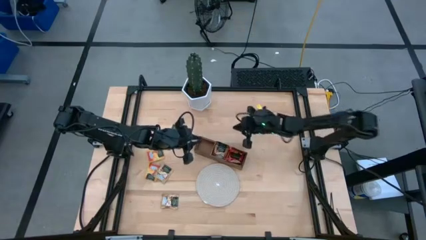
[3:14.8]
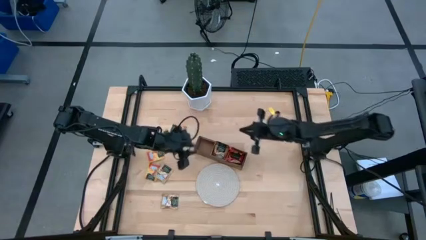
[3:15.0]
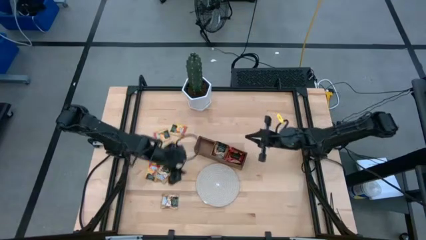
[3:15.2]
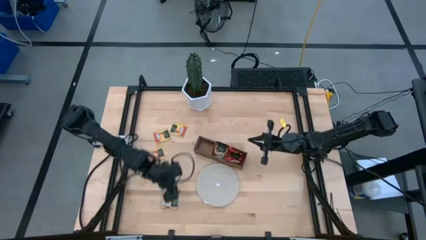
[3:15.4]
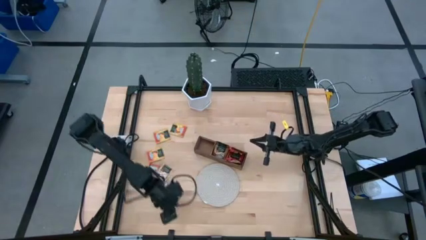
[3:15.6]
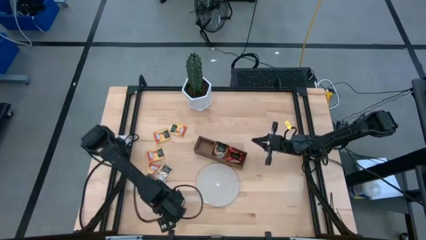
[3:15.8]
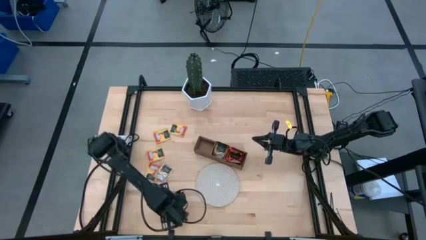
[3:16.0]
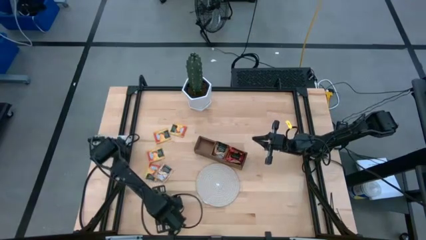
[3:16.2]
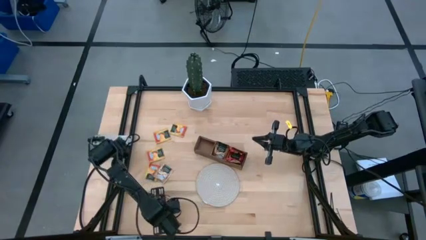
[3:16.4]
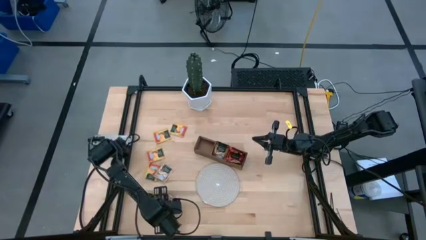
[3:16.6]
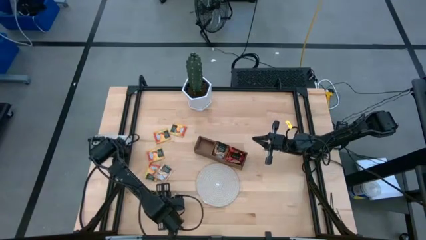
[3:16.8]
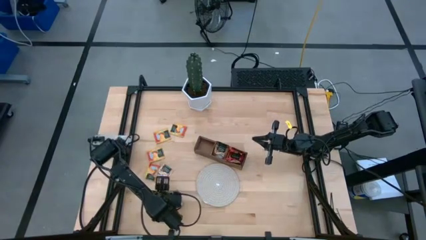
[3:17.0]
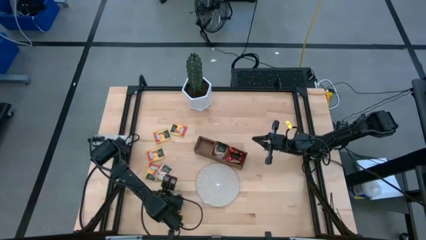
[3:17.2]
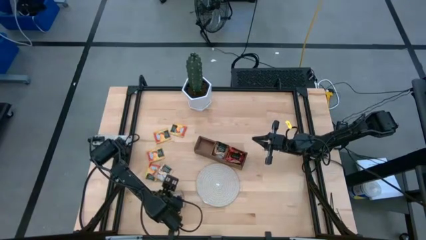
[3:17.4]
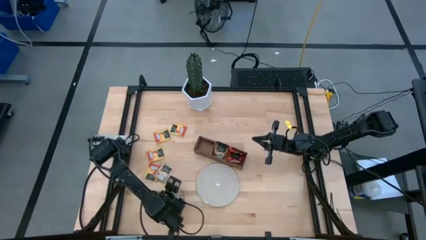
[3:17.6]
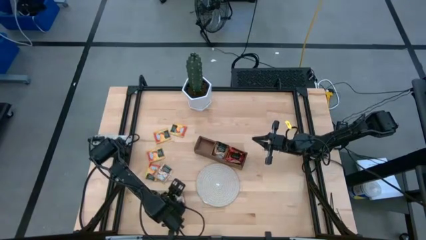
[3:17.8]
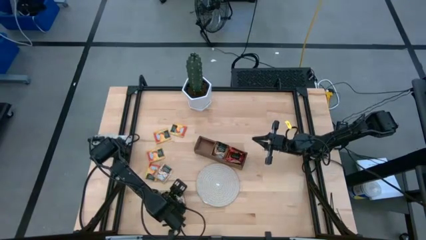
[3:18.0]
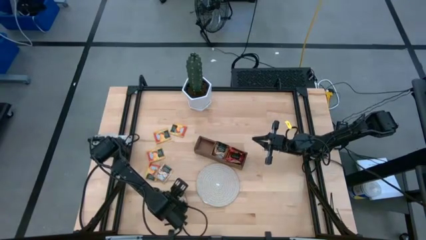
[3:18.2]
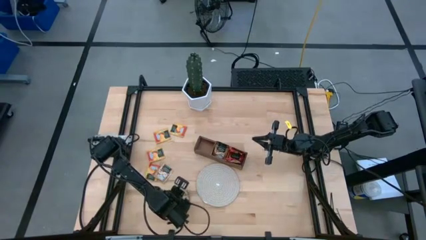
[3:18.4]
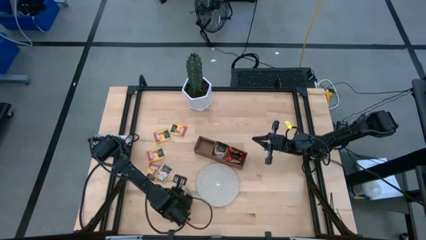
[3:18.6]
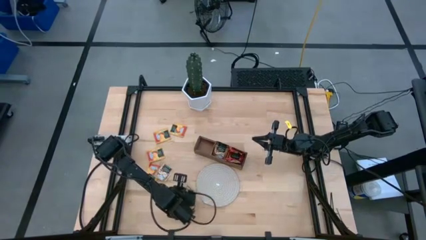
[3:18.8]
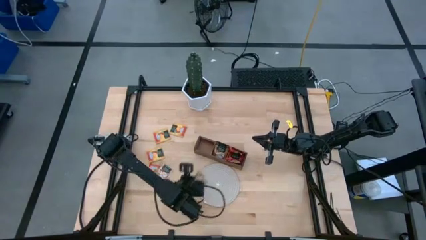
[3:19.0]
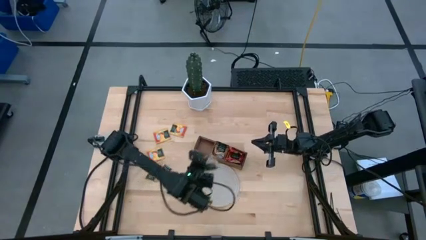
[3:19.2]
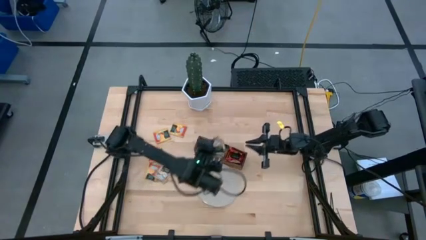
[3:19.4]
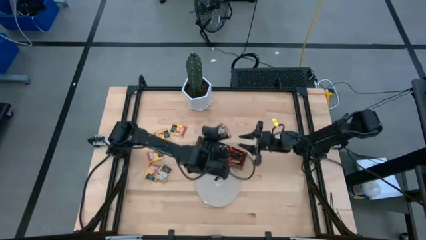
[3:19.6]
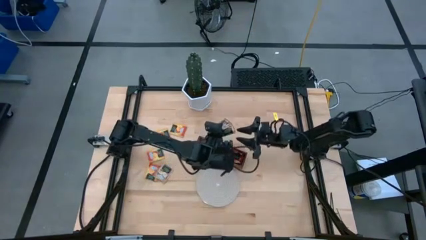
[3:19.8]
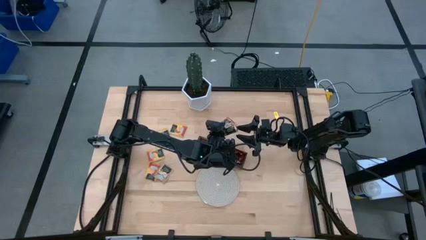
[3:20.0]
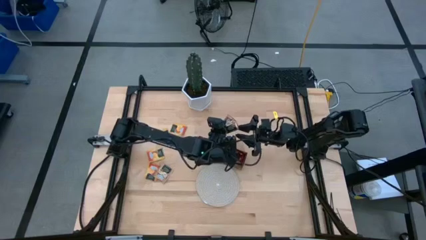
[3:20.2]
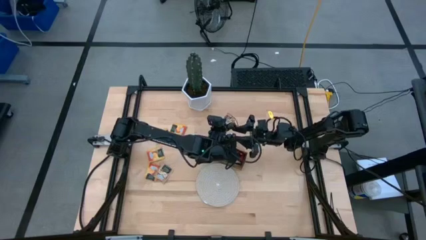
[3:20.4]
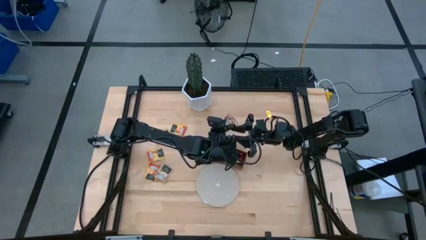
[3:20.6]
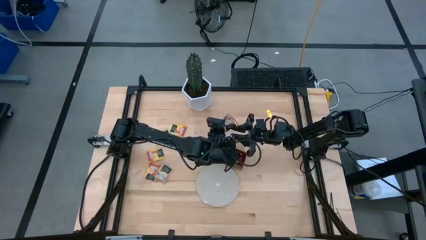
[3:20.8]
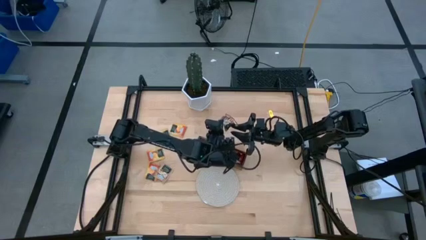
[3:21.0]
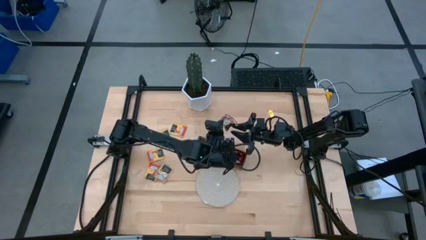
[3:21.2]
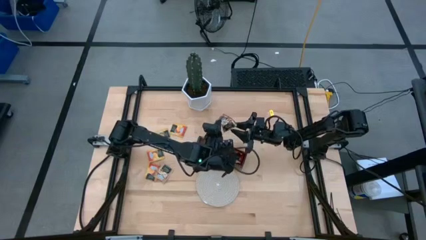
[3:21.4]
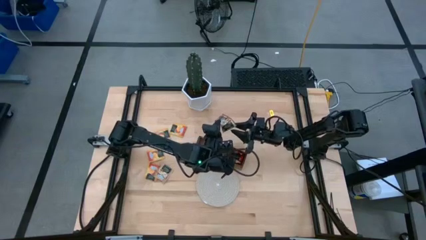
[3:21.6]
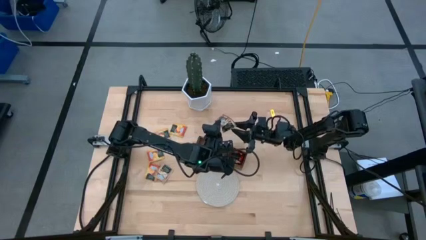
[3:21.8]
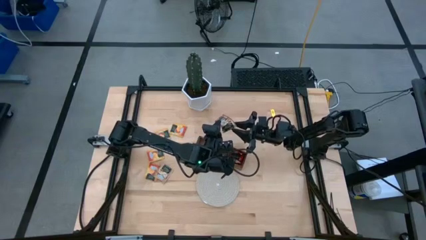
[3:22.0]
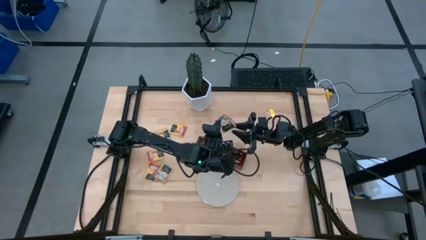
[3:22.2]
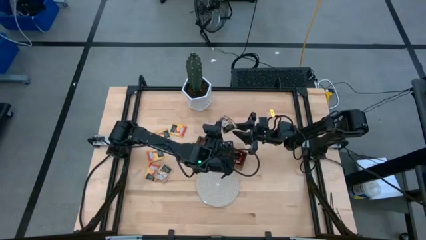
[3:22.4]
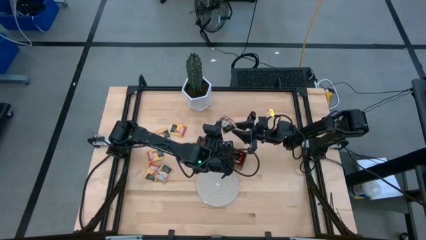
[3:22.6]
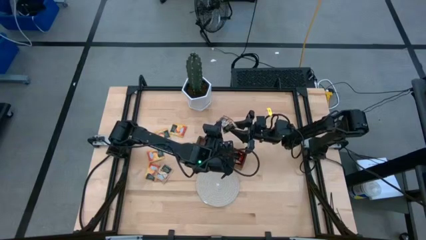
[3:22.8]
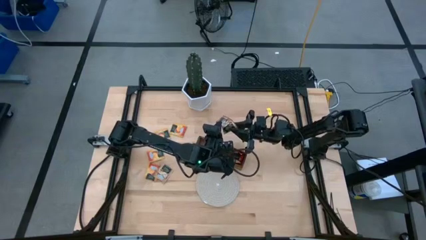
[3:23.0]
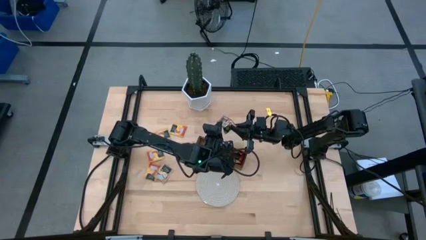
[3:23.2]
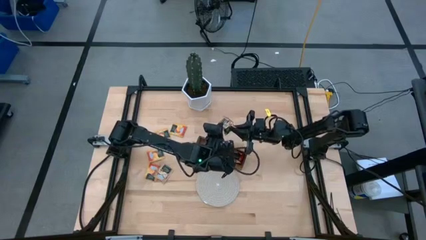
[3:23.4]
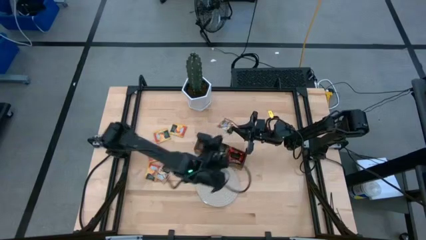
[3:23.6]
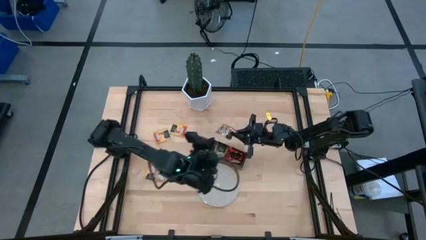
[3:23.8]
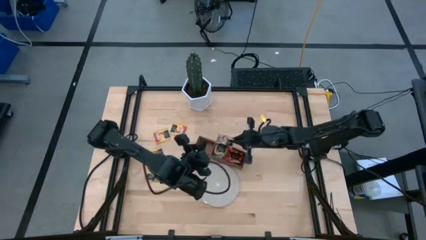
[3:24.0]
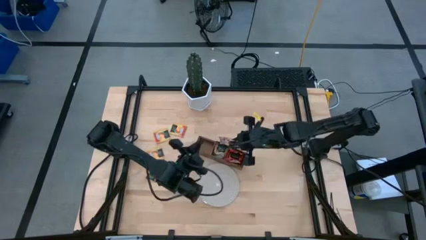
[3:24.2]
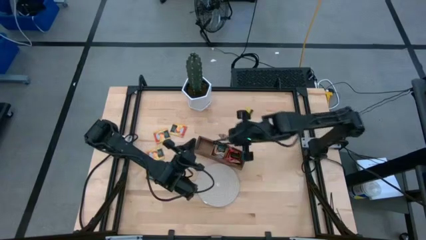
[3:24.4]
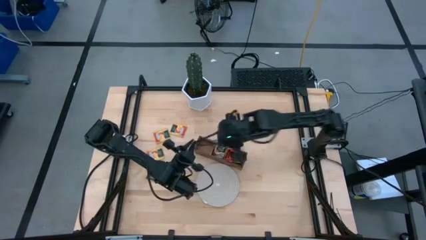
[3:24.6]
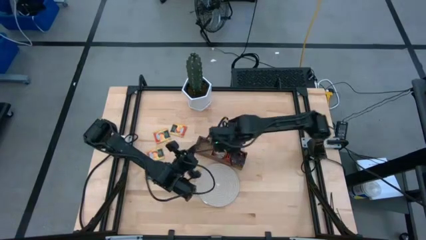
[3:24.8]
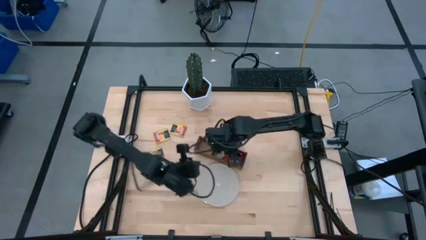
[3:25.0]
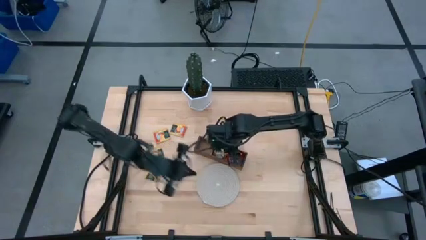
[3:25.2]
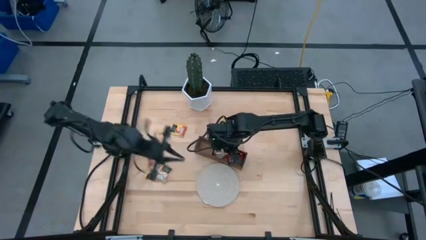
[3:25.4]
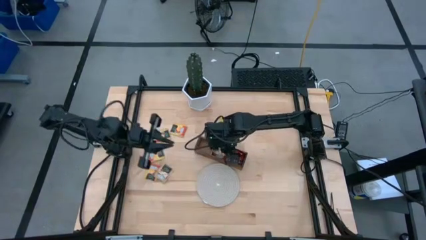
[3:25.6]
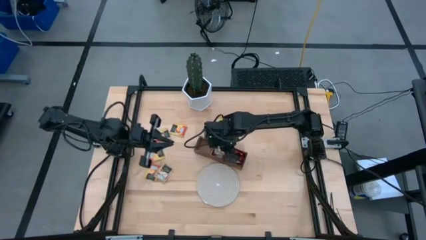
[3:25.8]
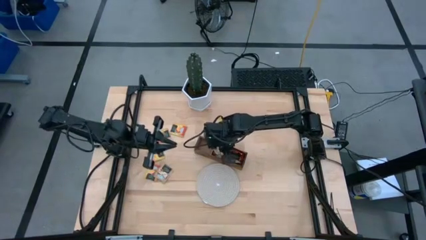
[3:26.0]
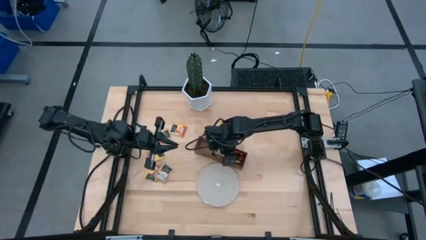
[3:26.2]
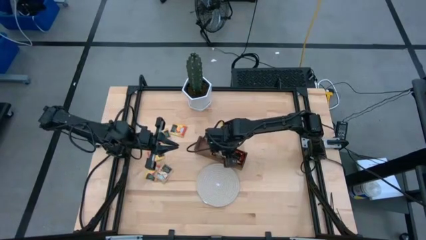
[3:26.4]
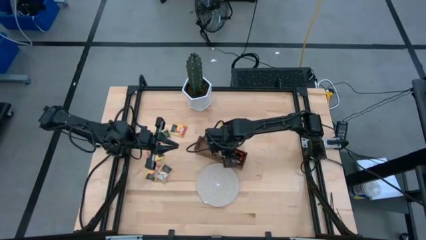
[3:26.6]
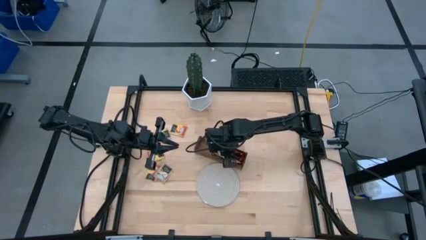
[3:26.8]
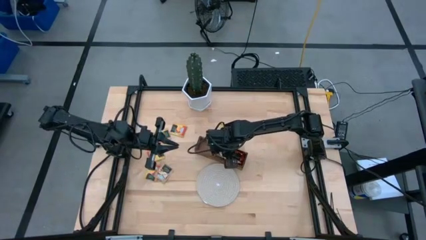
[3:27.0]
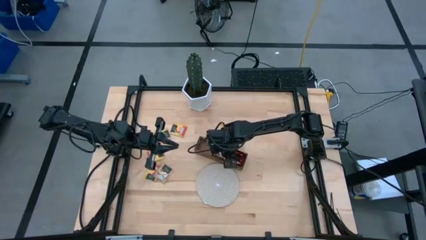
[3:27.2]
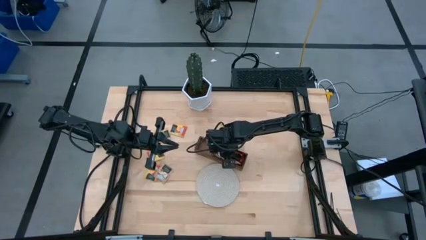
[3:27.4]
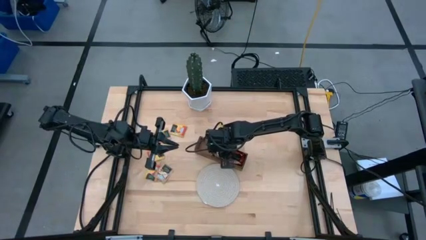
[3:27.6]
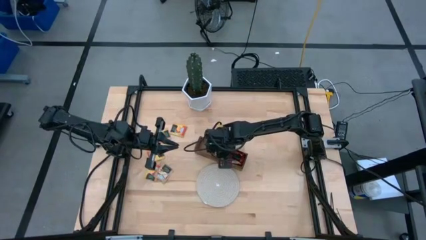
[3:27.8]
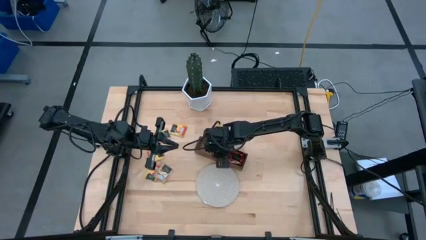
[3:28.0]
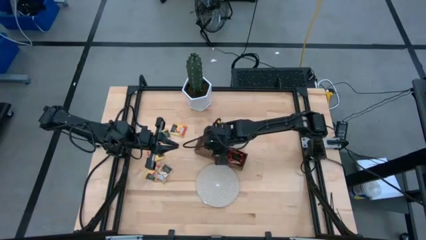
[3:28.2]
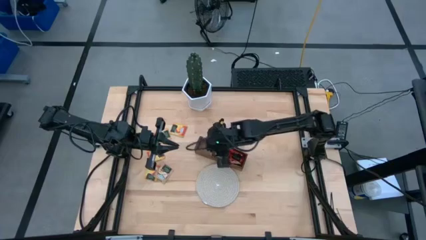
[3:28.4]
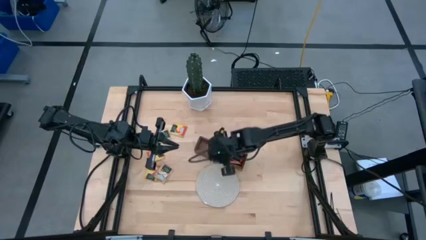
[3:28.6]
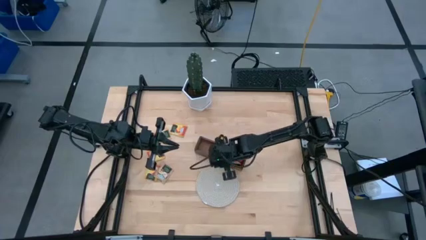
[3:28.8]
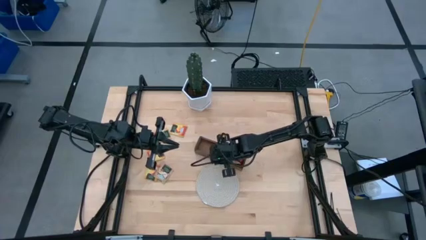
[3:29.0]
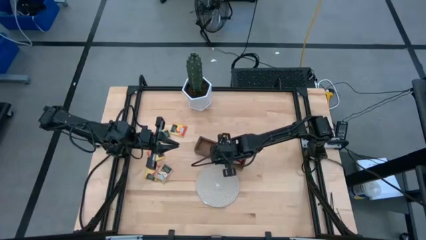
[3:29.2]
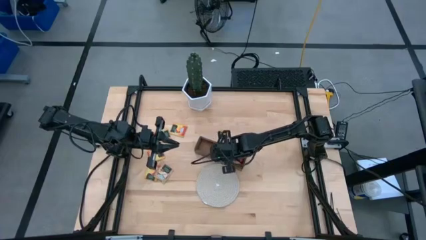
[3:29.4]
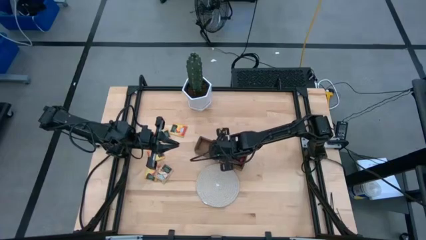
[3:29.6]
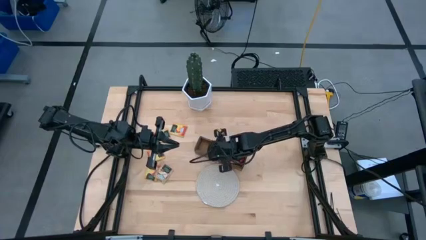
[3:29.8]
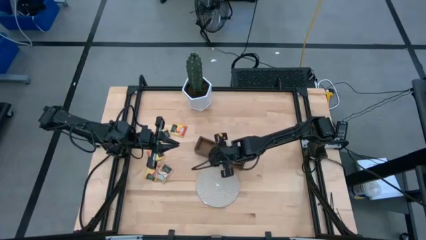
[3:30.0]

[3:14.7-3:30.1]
Task: Pick & Place Tea
Put the brown tea bag into the middle section of the wooden organizer

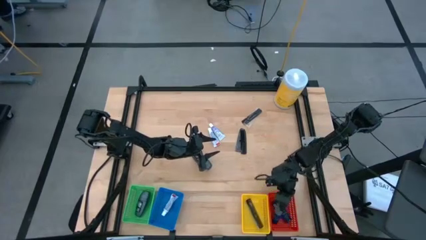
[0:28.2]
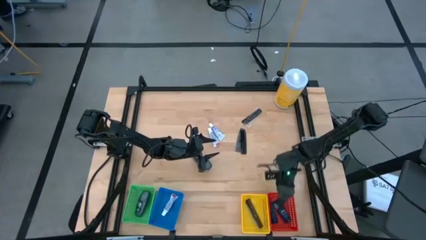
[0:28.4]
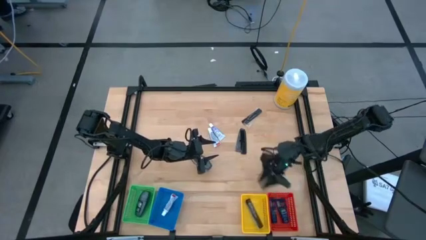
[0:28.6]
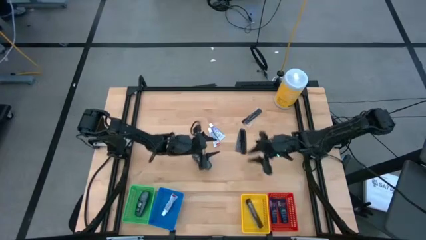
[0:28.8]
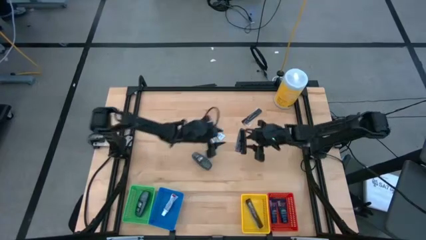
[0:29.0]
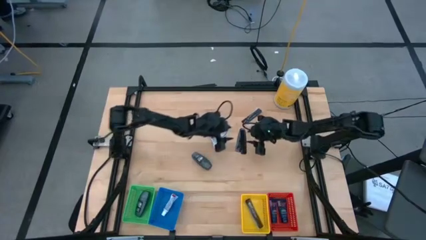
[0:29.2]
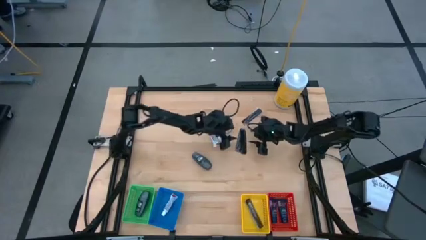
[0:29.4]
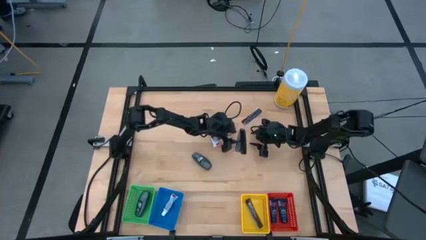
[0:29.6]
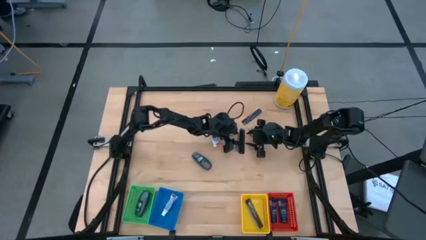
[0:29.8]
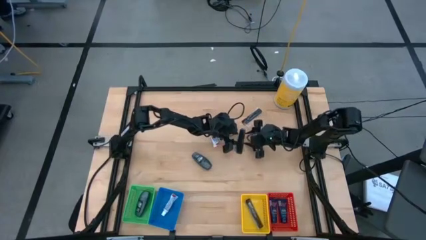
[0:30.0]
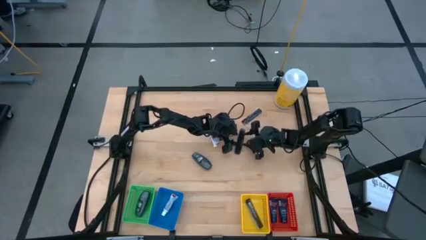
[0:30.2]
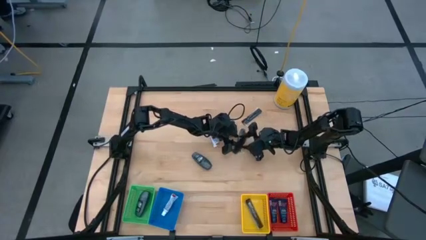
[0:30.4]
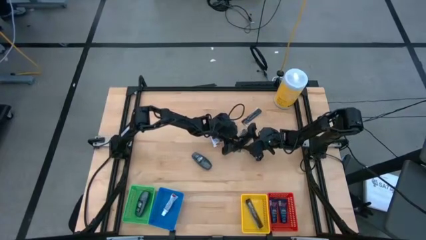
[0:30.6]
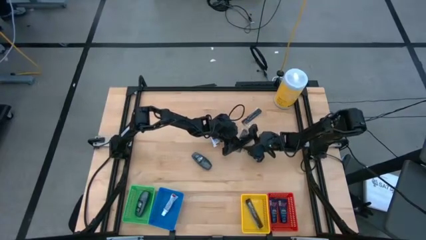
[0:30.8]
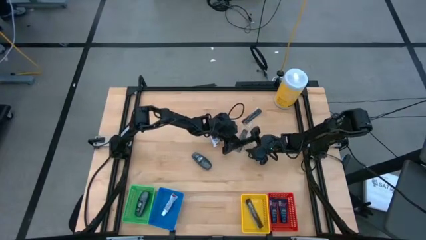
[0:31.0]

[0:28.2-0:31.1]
Task: Pick & Place Travel size toiletries
Put the black comb into the yellow bin
